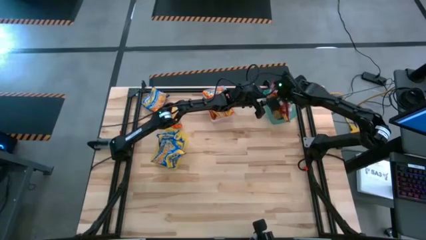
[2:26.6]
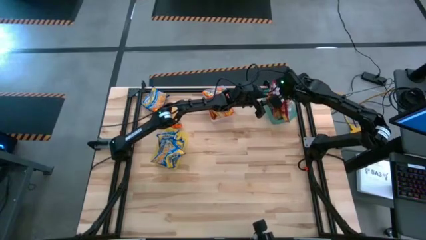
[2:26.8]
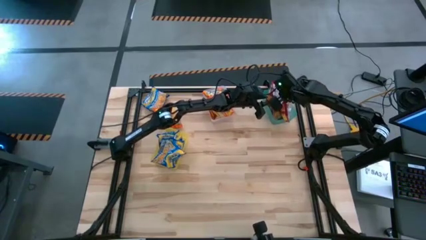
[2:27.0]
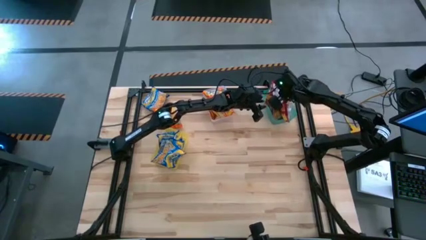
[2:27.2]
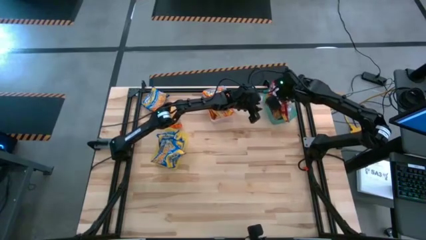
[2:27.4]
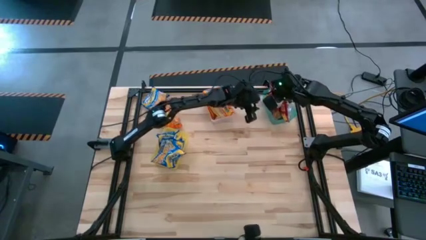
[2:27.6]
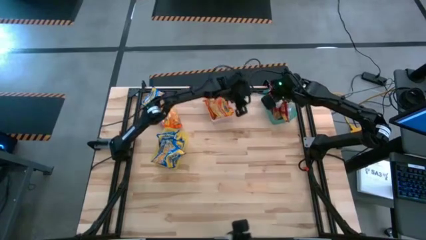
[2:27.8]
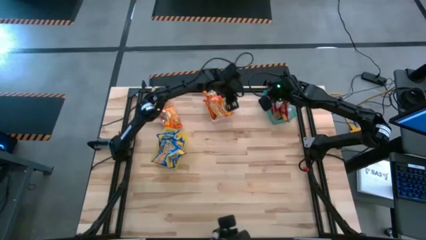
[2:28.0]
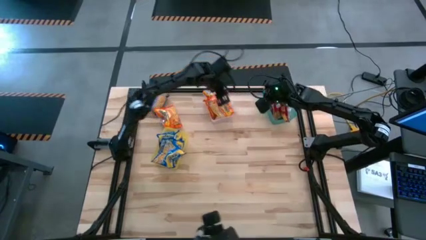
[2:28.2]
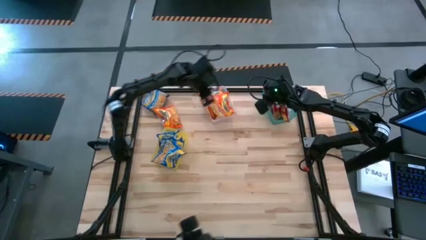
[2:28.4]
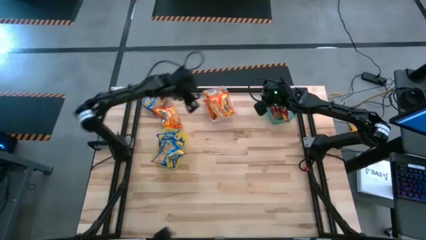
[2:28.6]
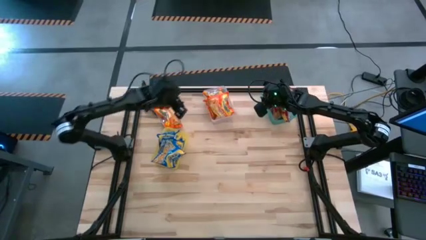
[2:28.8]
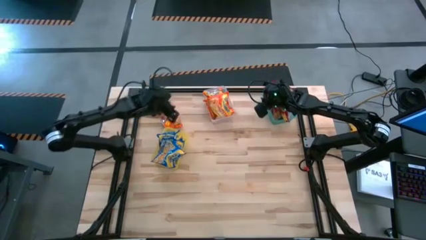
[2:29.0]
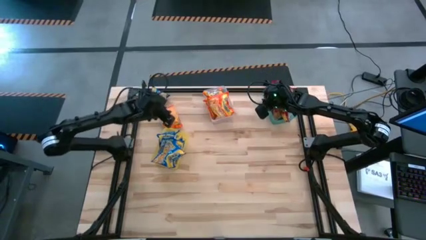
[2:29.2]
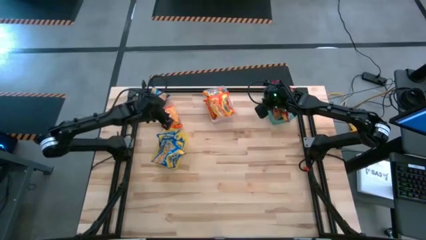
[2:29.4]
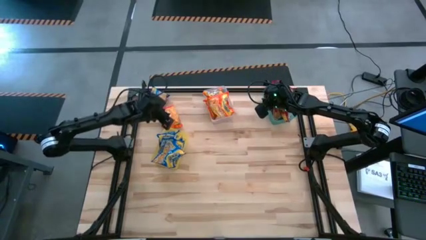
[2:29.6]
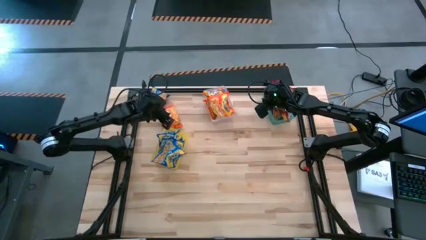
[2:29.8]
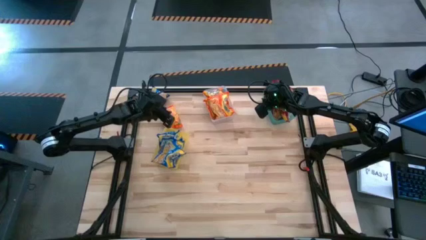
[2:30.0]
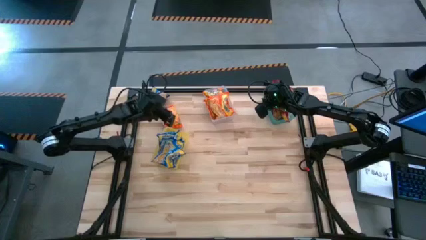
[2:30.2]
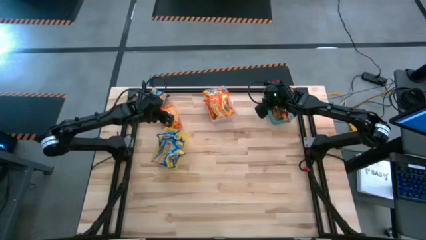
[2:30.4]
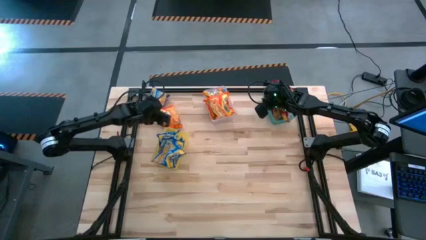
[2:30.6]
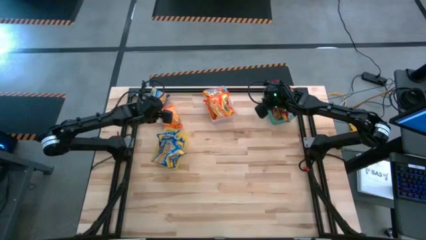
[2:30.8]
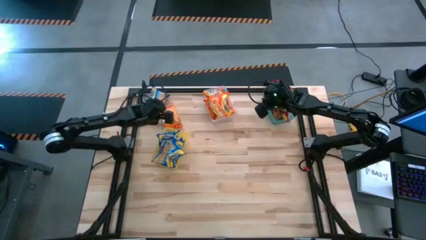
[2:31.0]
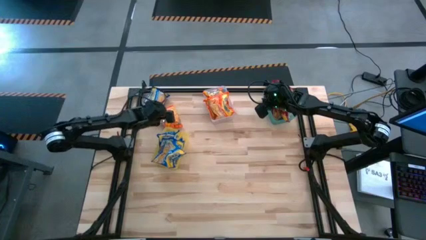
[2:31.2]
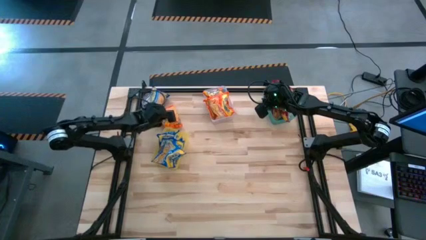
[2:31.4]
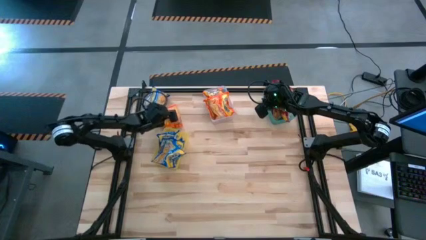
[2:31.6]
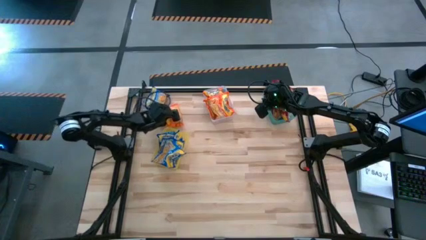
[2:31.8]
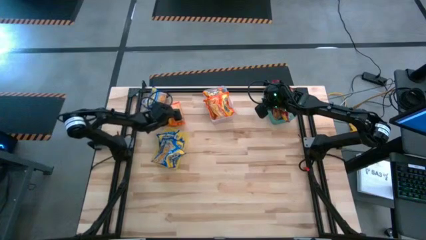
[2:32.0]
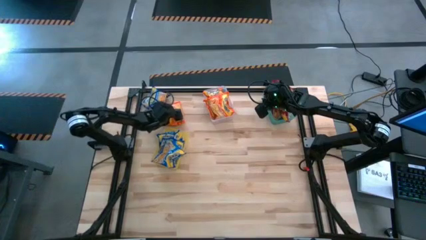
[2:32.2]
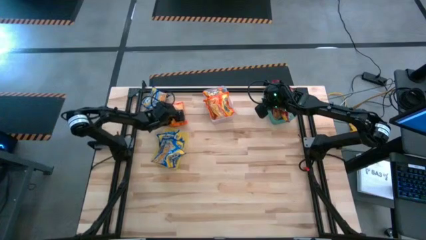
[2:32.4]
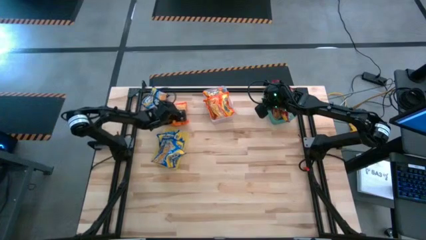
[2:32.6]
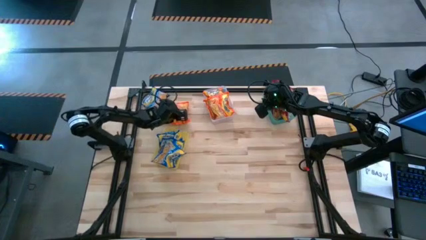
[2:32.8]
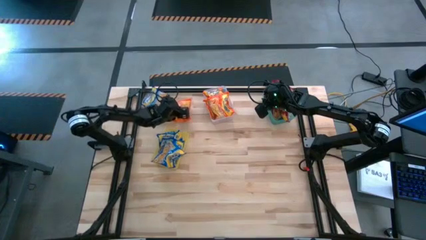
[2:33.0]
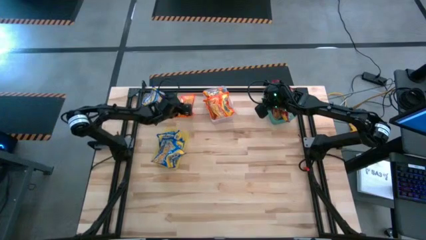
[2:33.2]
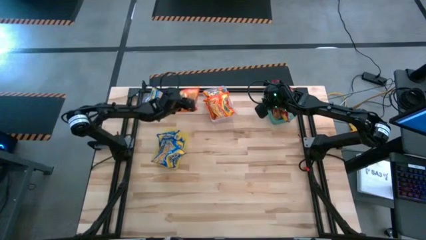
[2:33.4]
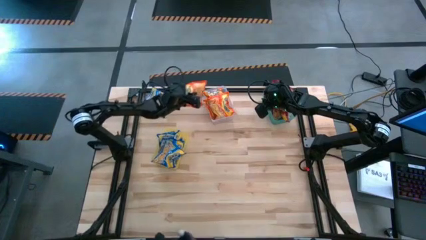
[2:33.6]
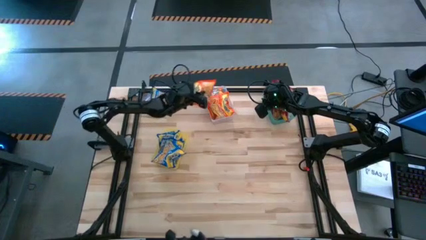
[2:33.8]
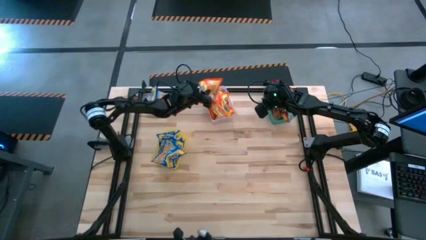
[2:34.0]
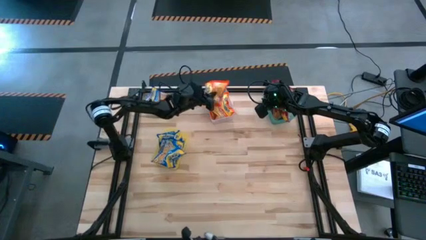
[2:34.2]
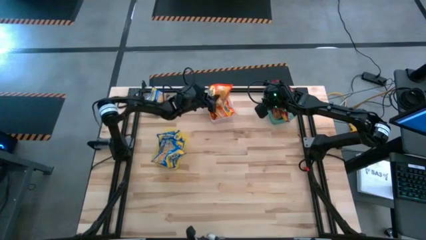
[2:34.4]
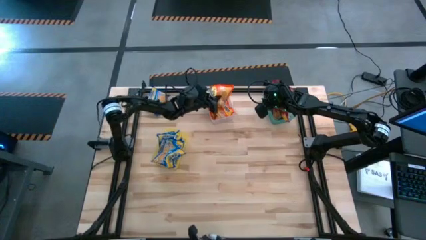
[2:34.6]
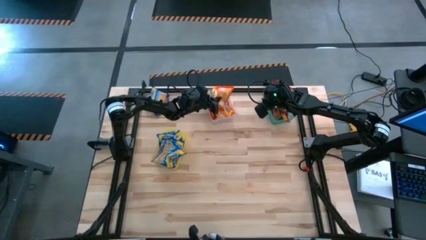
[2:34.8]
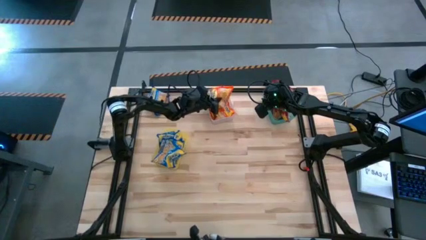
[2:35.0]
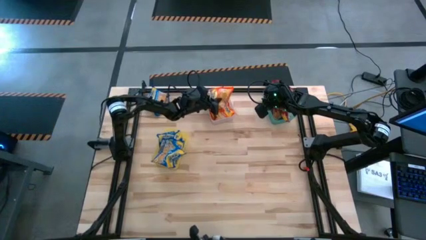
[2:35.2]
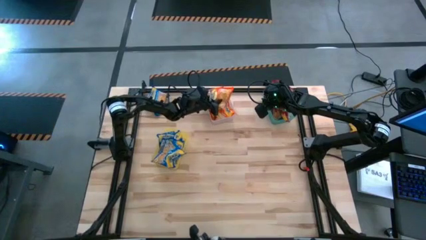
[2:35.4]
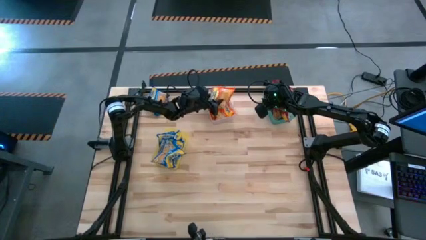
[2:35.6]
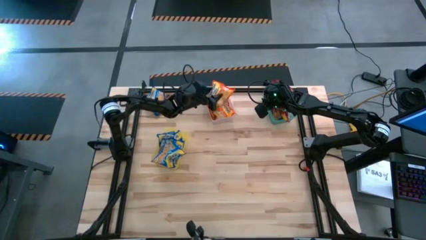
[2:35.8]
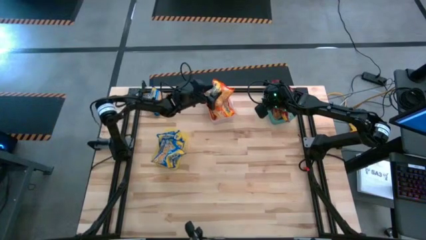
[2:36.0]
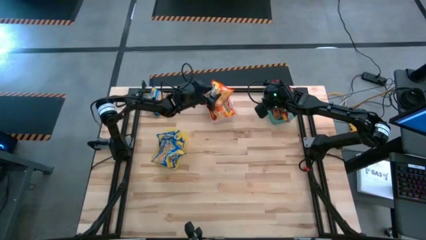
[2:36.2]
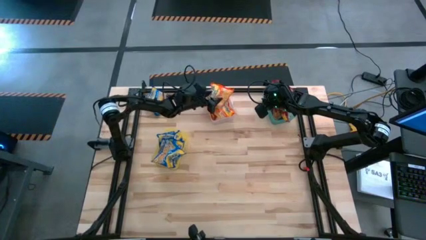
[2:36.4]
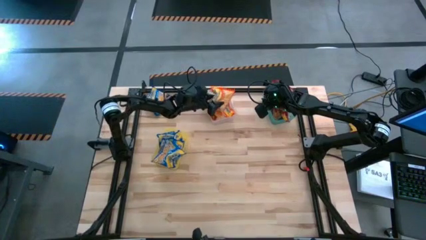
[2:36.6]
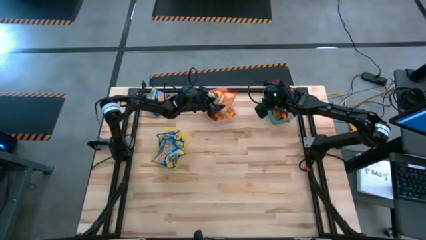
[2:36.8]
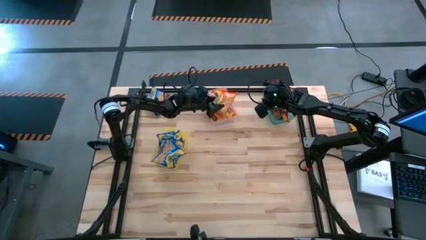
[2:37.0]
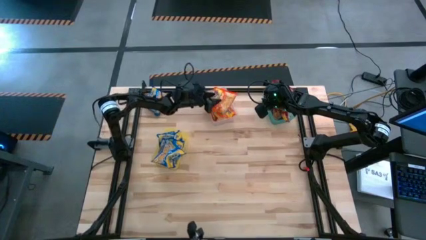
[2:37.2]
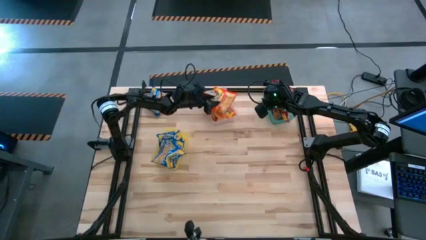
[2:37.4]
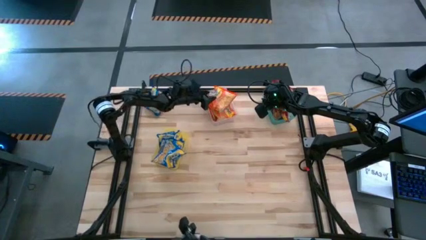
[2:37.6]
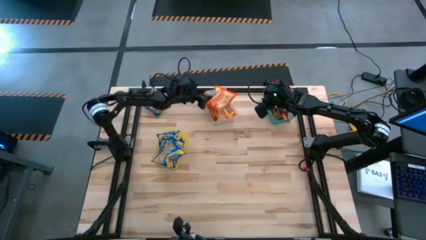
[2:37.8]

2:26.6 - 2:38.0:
Task: Sort Maruchan noodles
Put the orange noodle pack into the transparent bin

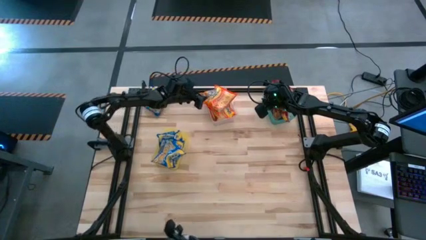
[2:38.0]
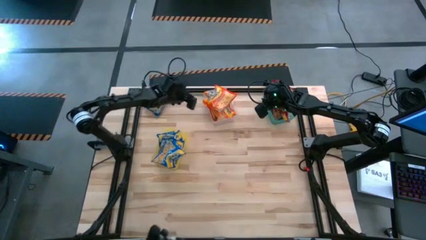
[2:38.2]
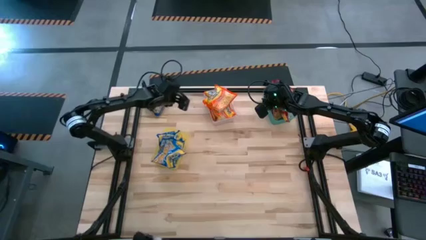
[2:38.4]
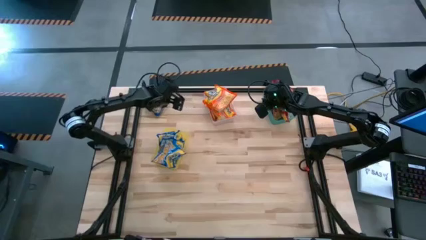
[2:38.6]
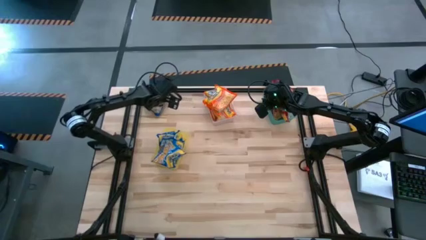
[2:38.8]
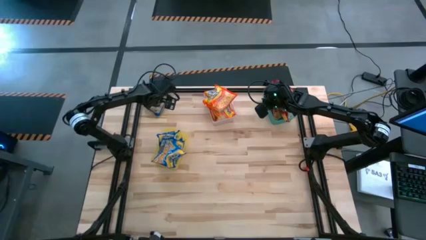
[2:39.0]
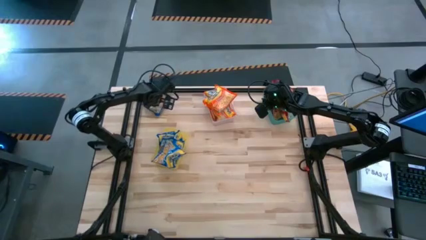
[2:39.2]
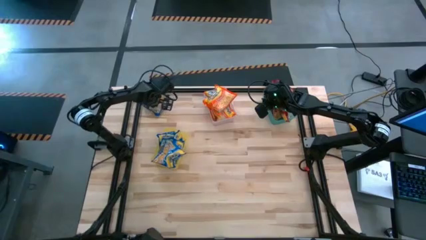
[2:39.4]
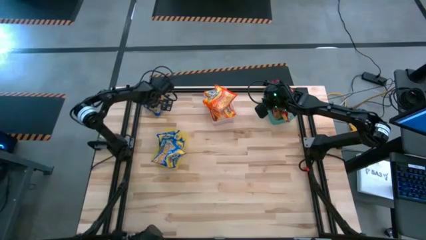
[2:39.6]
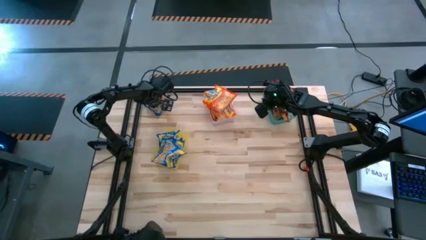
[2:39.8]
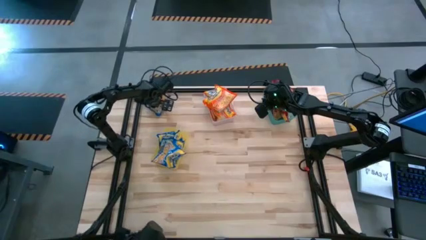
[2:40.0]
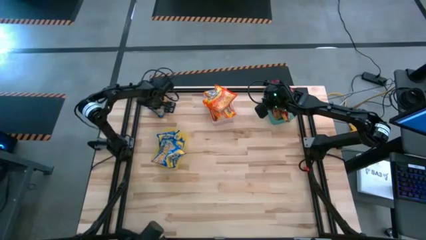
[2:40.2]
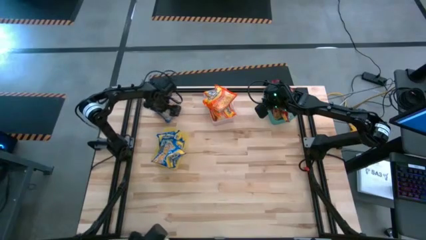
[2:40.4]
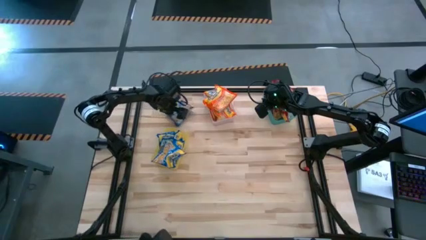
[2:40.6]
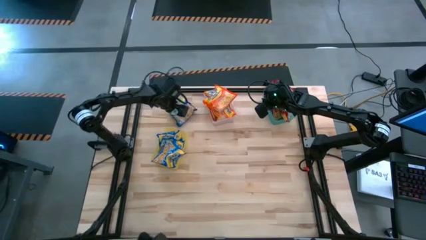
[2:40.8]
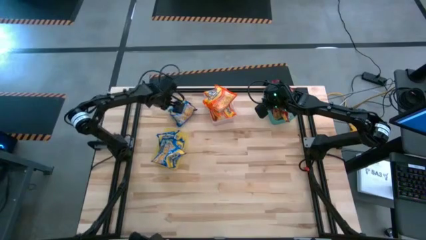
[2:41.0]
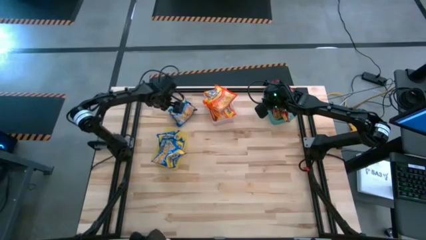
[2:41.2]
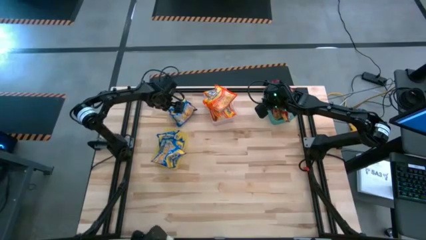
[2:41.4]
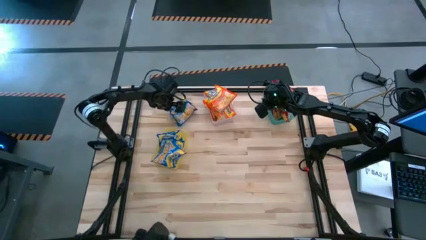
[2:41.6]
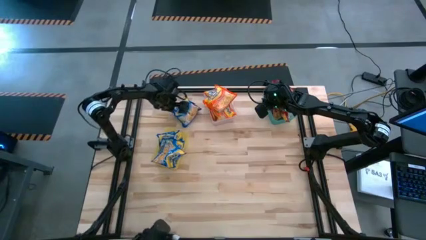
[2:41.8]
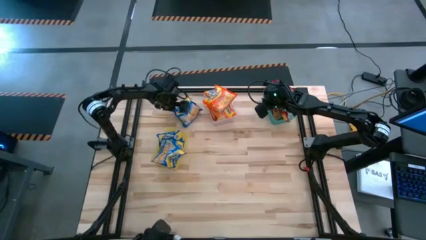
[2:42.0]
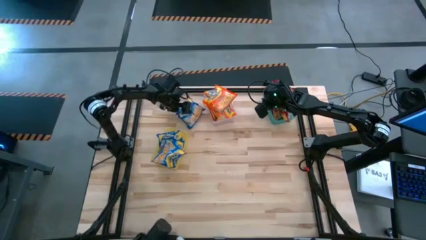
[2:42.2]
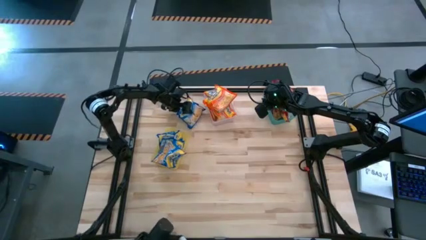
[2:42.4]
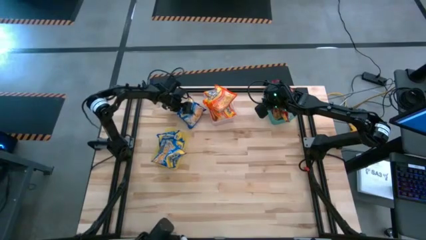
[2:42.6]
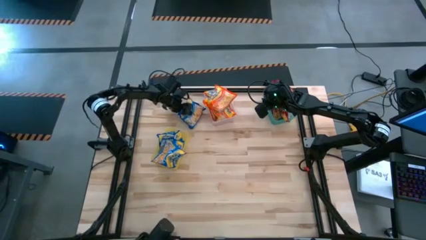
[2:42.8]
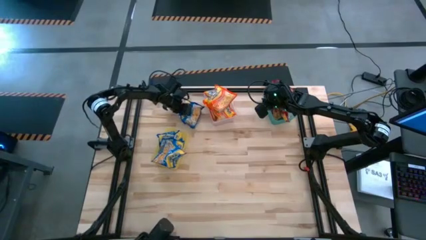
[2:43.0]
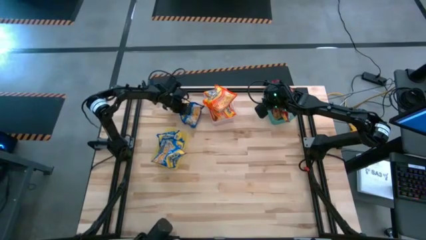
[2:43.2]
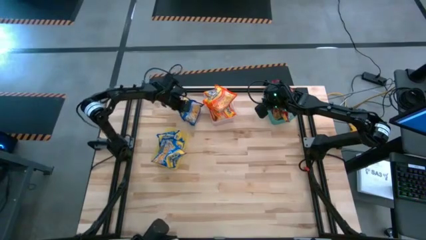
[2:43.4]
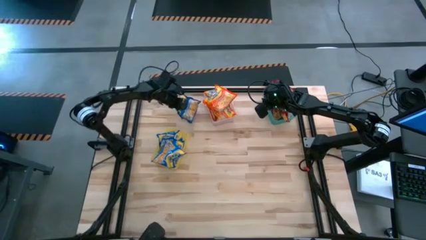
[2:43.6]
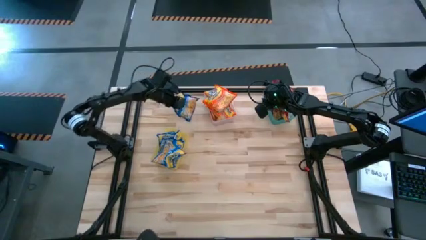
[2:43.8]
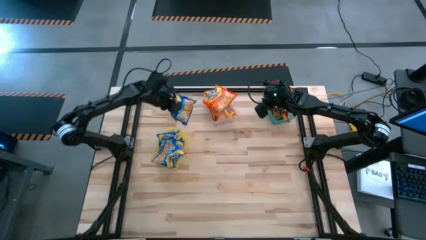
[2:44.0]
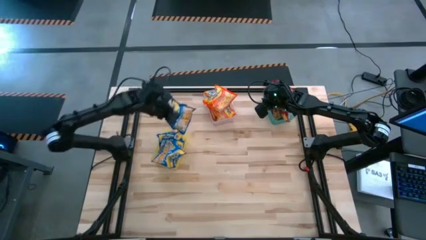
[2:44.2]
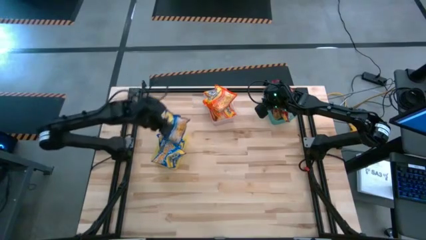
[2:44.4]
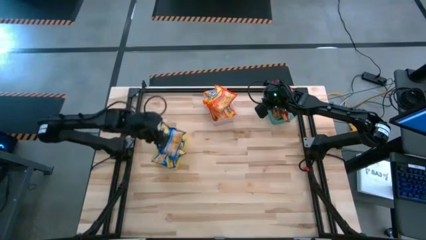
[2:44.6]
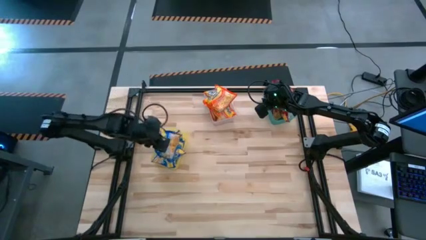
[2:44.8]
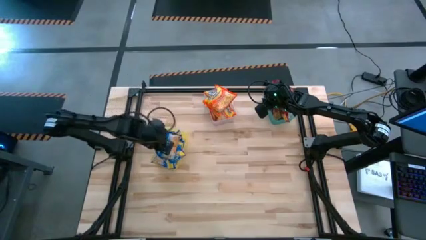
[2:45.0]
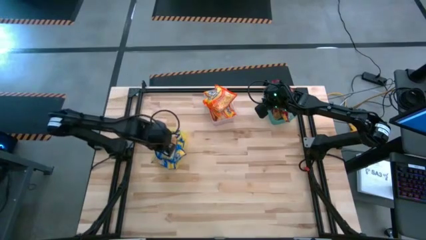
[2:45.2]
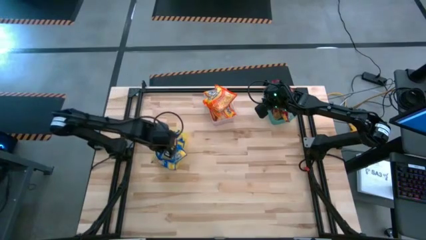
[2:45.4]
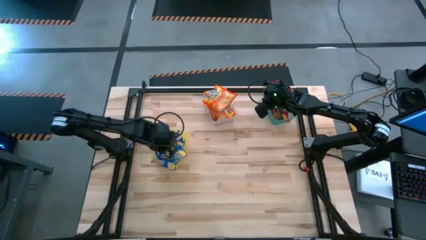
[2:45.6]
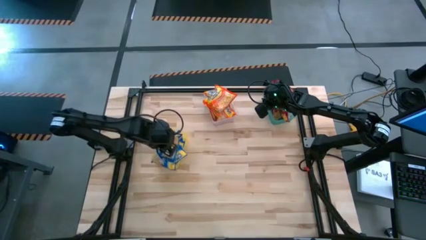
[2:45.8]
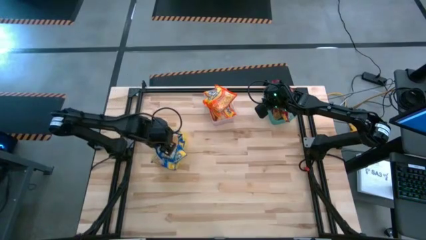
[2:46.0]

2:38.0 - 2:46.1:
Put the blue noodle pack into the yellow bin
